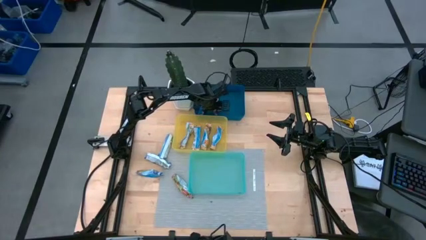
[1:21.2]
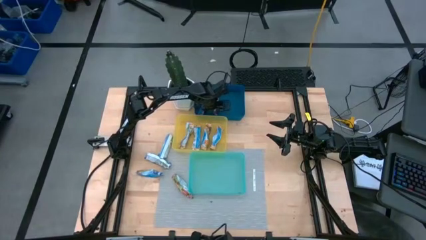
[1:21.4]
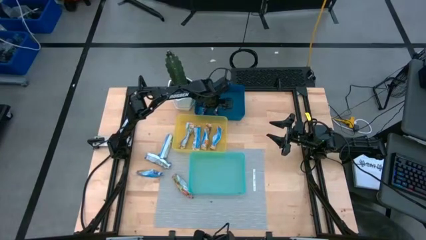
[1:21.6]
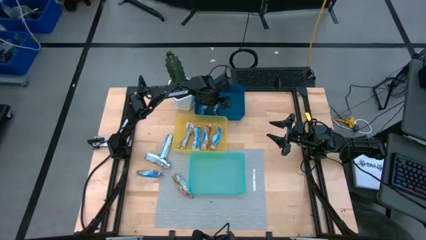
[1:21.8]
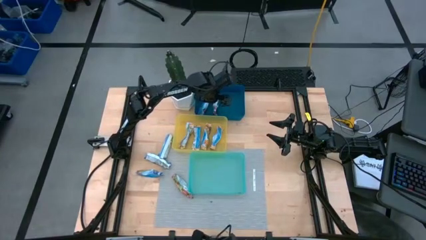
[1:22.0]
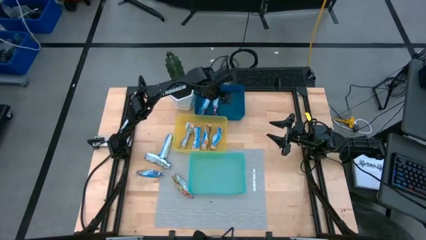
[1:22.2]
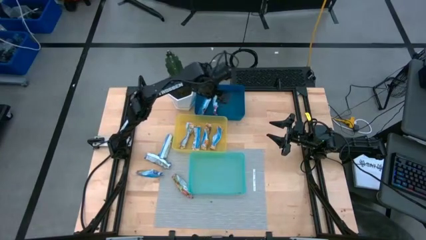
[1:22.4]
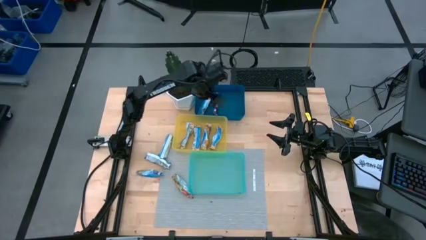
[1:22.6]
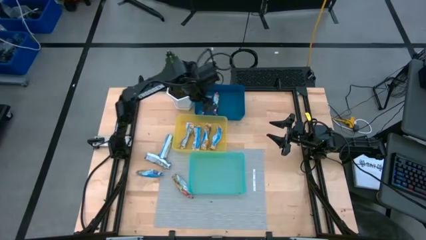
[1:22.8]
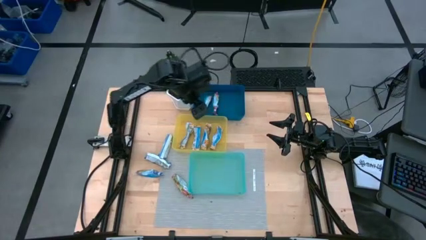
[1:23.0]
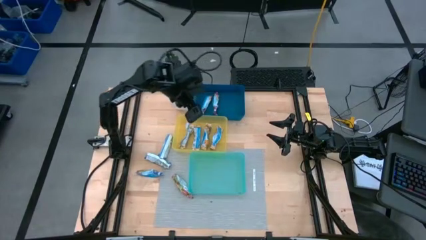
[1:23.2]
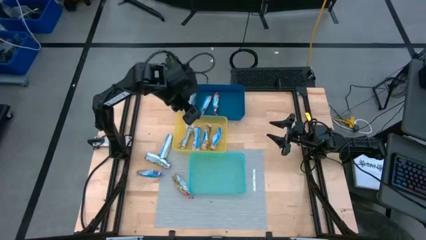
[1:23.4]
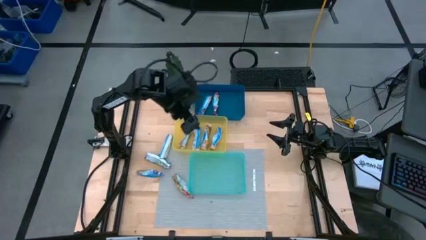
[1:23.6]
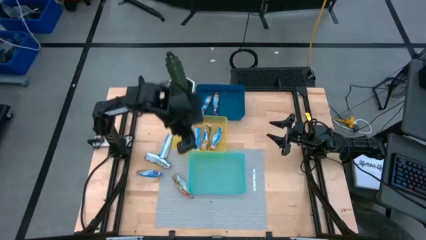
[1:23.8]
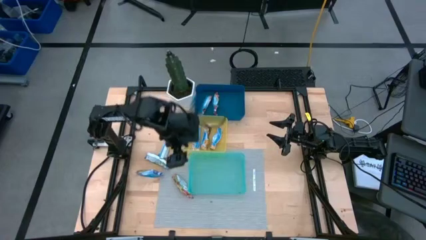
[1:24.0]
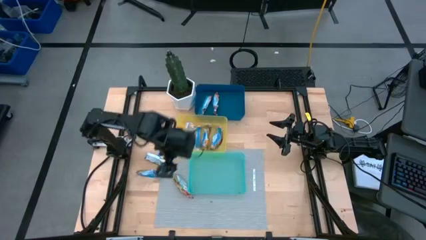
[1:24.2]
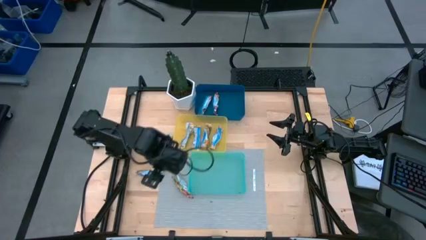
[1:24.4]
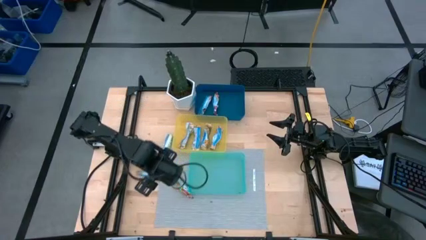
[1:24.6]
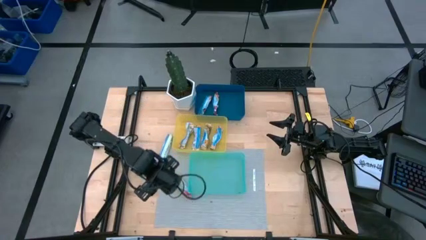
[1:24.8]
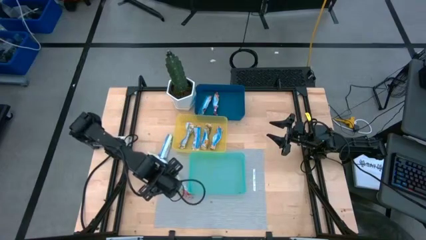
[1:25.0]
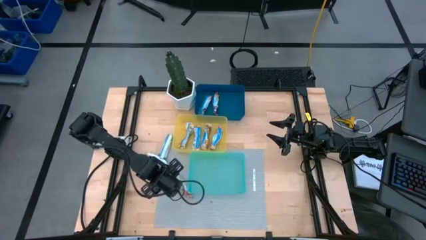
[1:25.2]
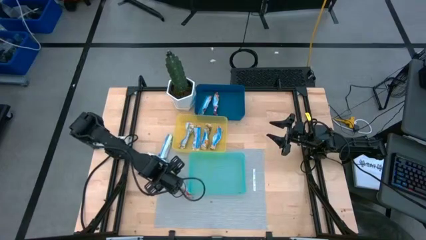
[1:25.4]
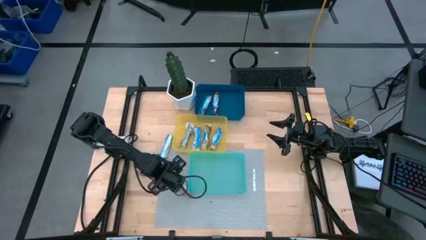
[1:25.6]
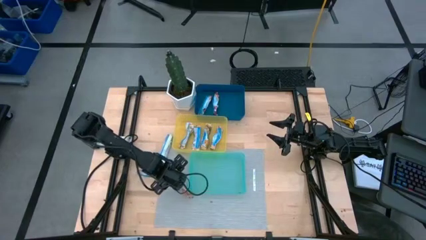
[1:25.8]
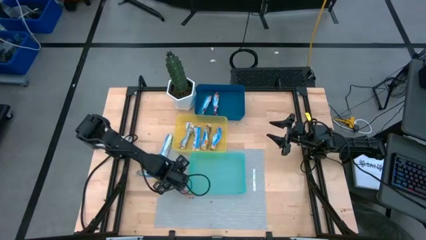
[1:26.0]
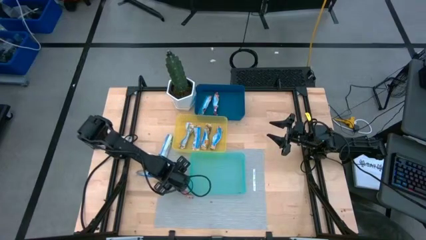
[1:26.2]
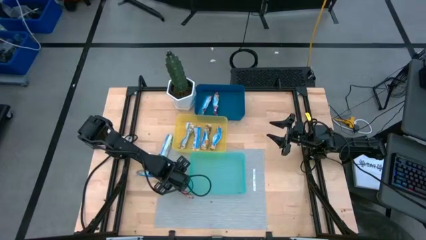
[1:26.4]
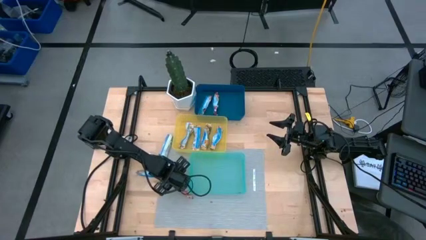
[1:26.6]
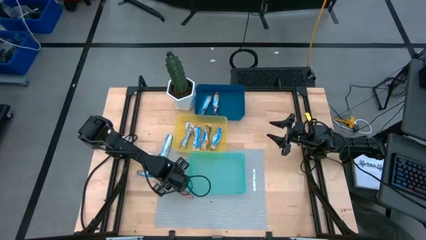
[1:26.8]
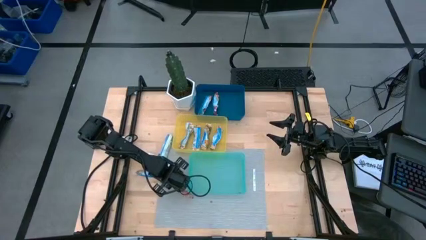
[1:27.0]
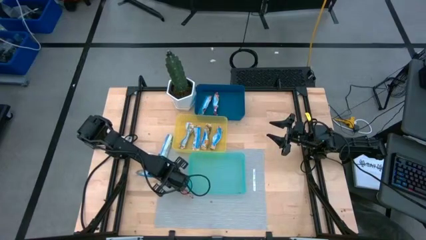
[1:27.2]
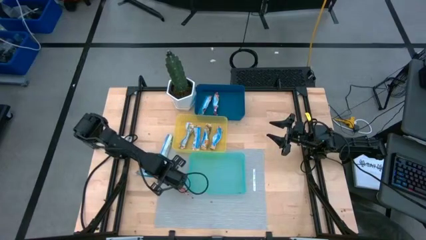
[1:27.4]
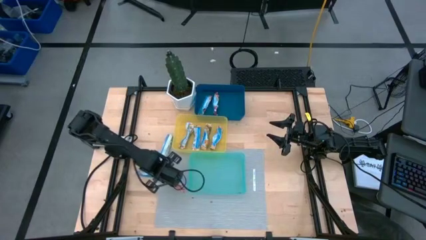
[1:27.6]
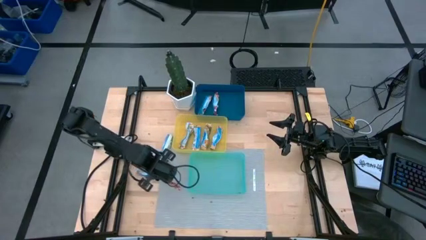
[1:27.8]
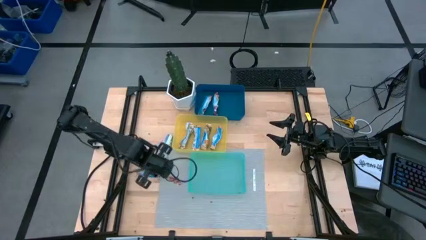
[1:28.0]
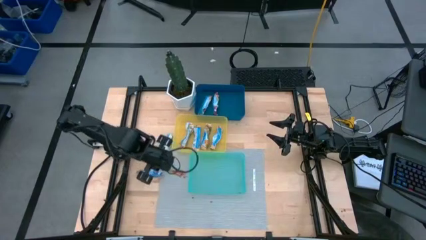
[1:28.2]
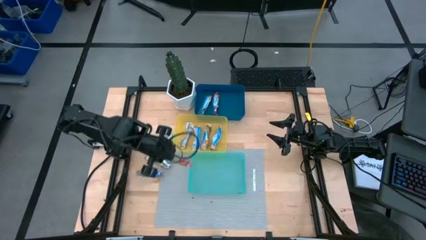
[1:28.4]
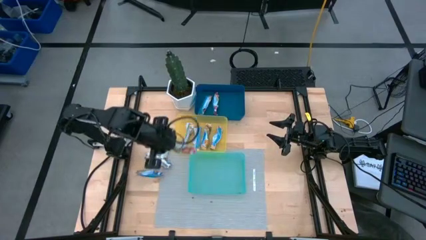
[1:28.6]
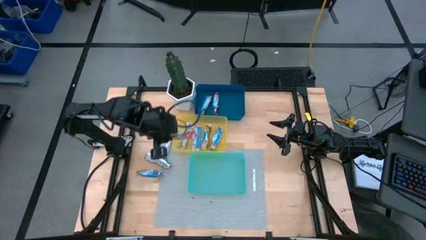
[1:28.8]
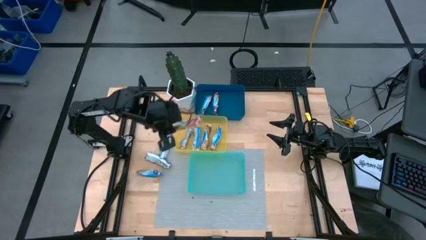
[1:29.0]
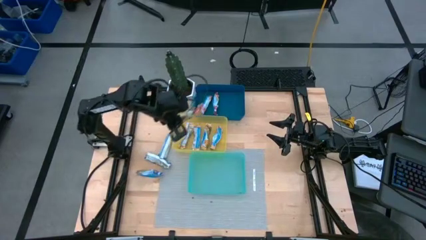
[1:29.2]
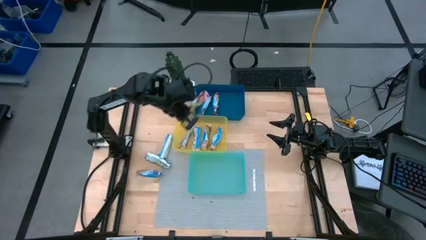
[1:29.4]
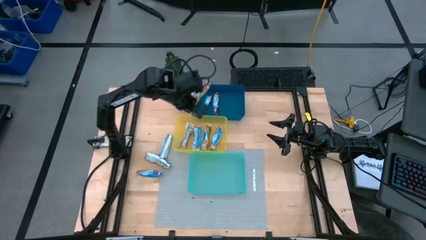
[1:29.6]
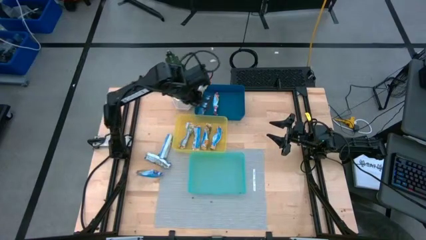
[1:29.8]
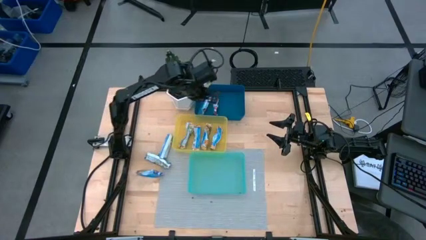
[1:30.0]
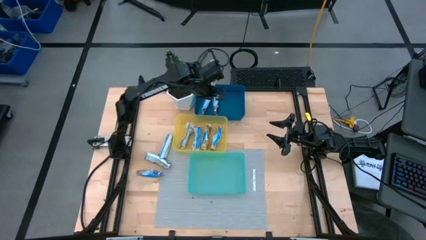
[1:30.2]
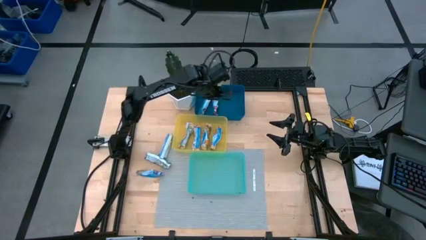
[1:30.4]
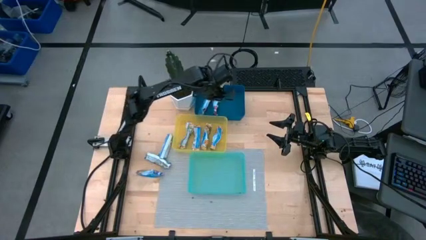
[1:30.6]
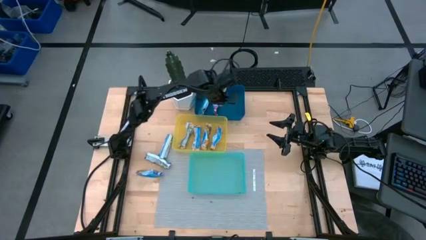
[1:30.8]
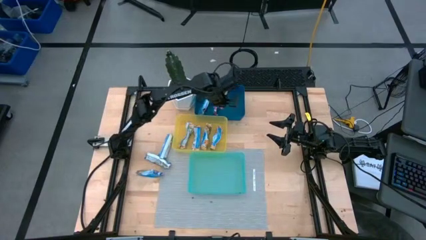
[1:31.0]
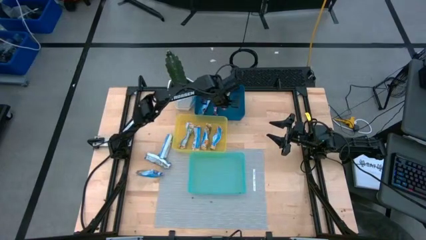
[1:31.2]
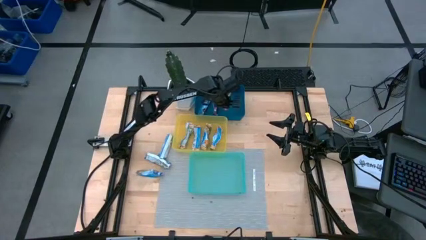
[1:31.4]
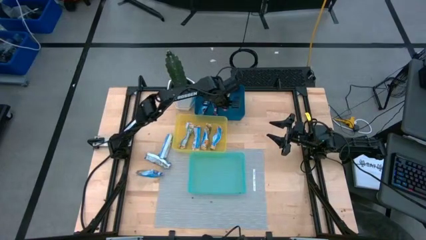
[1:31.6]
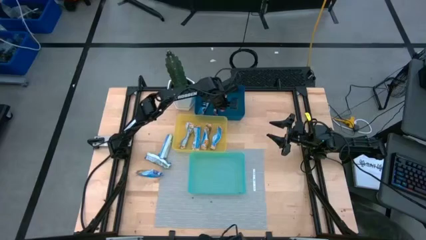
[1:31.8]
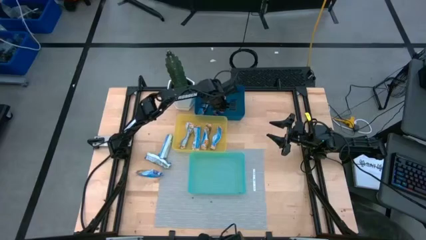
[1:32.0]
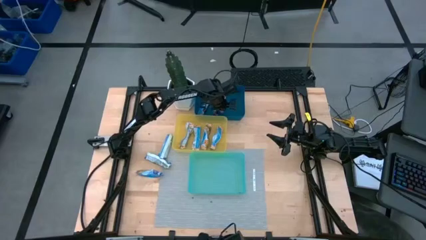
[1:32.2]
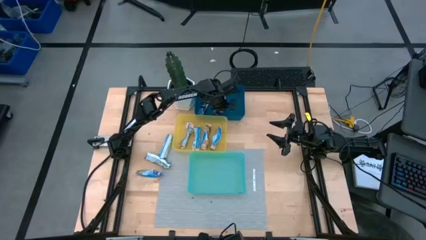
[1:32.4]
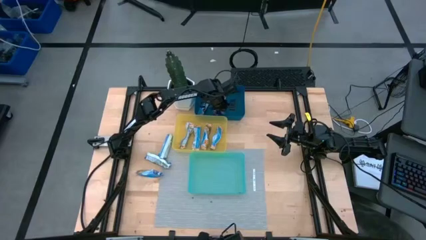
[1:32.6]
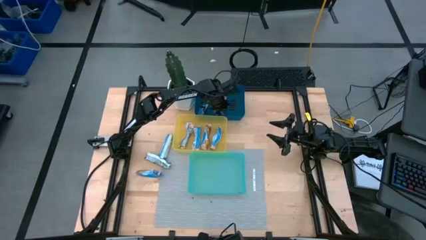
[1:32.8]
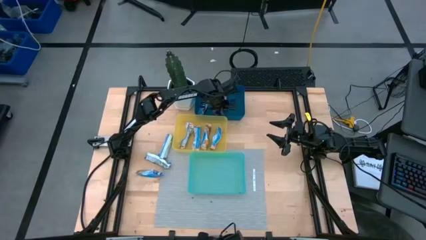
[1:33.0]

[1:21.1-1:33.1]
Task: Pick and place Granola Bars by type
Put the red granola bar into the blue bin
